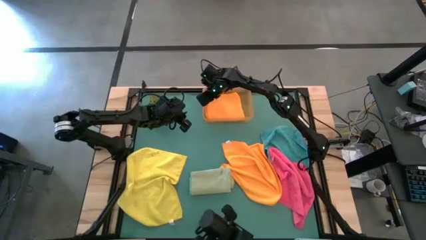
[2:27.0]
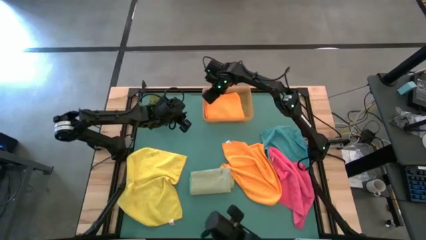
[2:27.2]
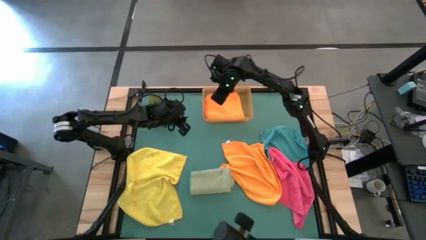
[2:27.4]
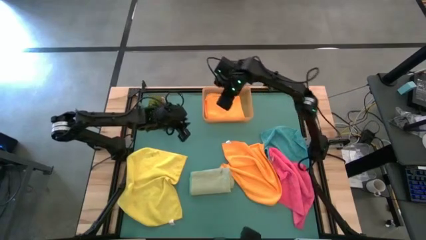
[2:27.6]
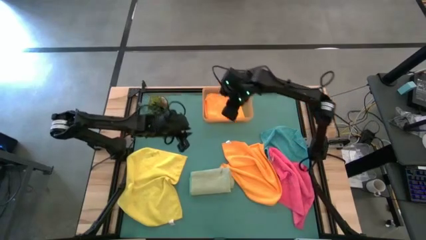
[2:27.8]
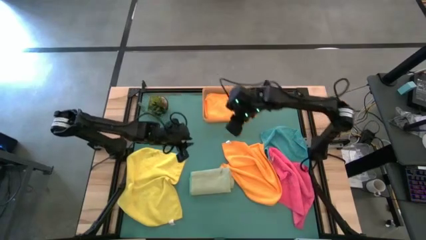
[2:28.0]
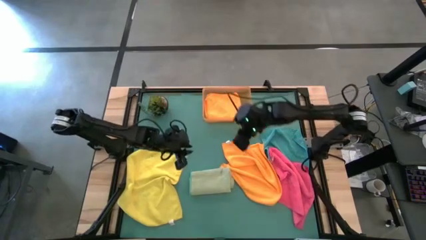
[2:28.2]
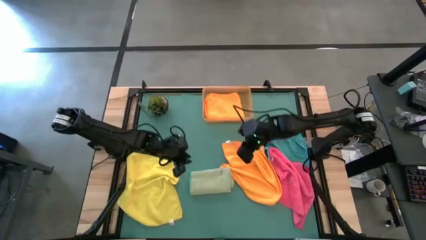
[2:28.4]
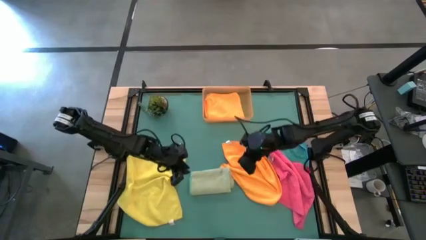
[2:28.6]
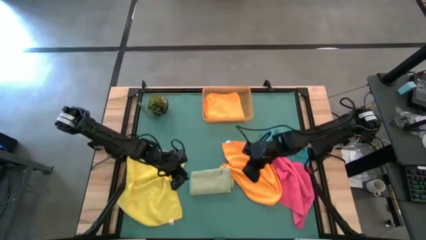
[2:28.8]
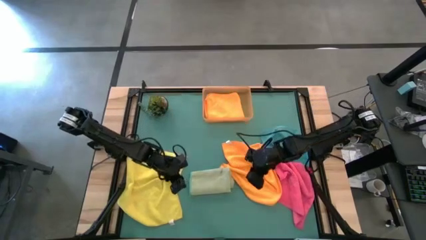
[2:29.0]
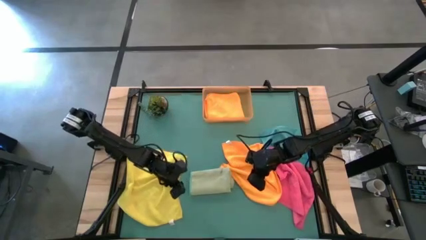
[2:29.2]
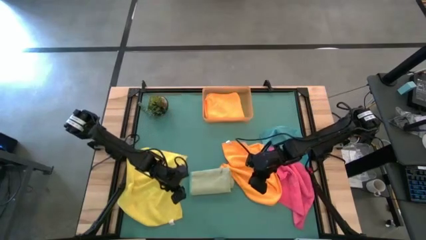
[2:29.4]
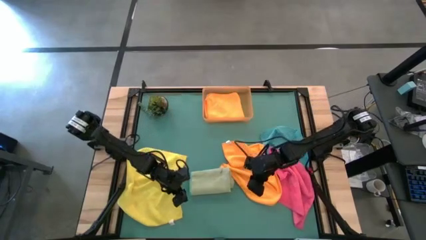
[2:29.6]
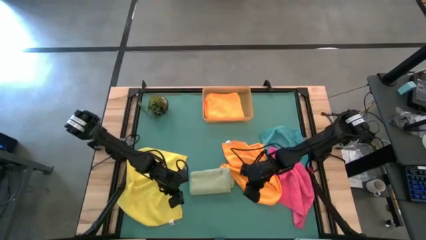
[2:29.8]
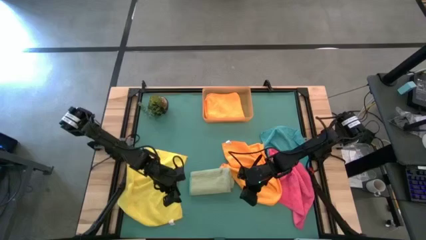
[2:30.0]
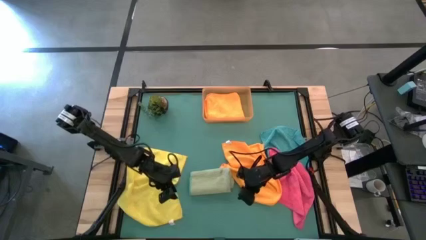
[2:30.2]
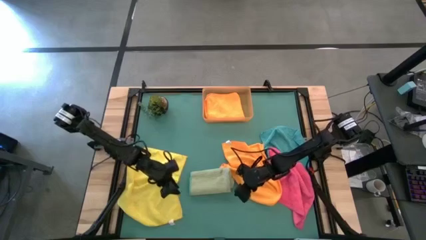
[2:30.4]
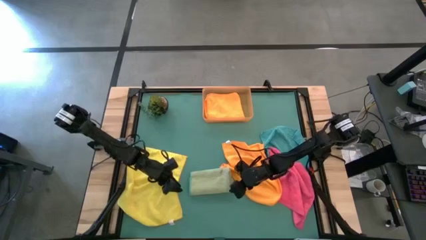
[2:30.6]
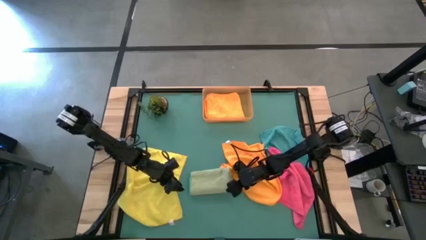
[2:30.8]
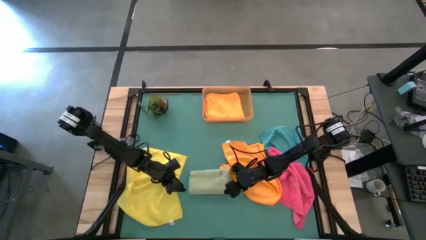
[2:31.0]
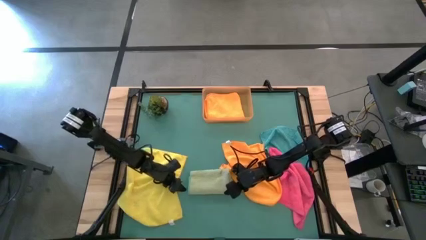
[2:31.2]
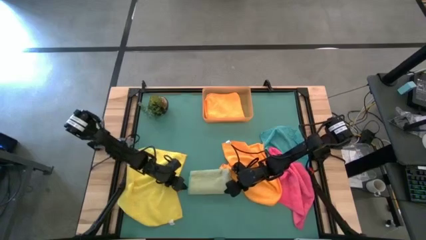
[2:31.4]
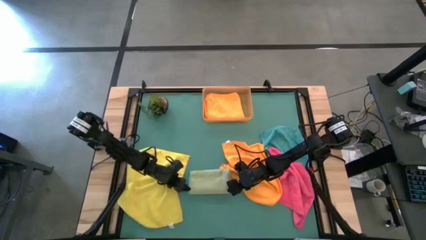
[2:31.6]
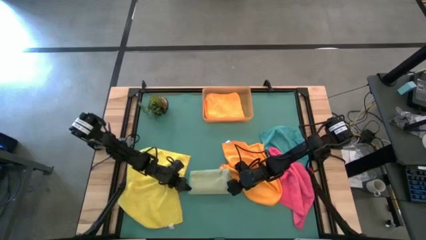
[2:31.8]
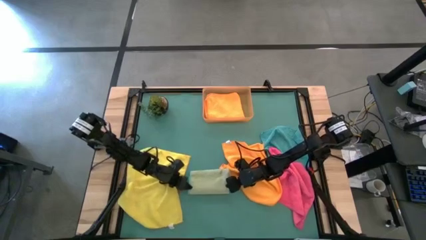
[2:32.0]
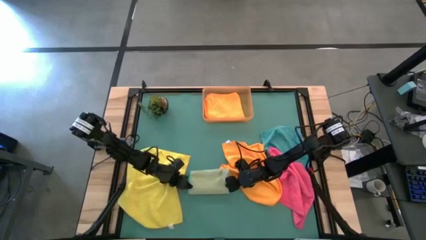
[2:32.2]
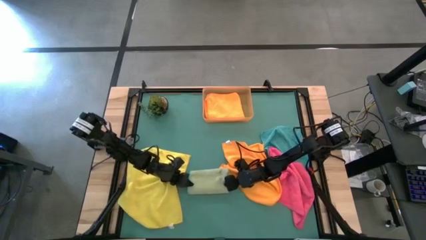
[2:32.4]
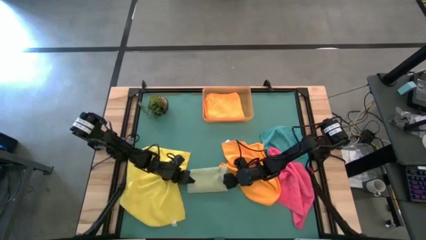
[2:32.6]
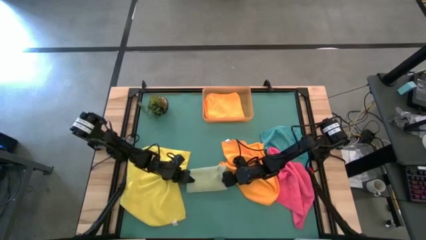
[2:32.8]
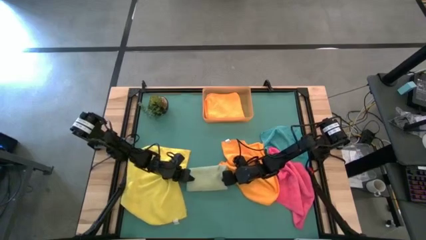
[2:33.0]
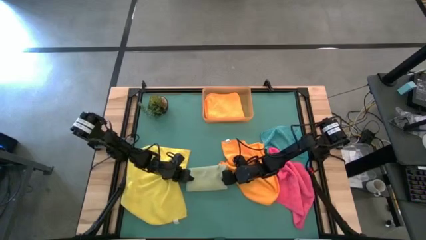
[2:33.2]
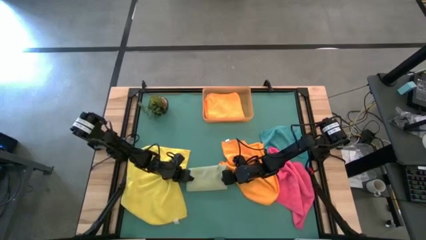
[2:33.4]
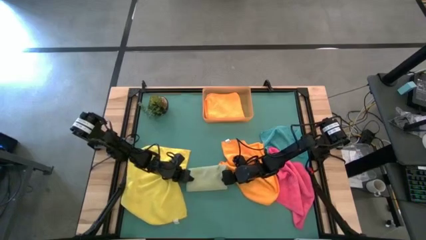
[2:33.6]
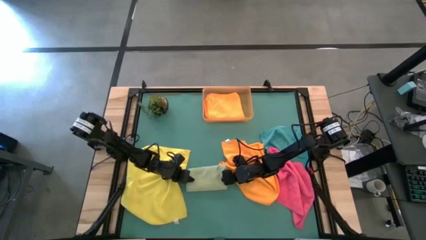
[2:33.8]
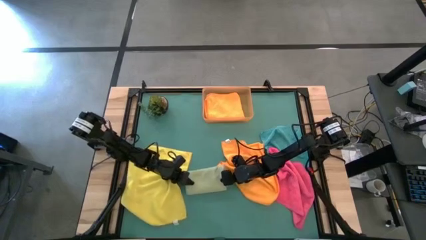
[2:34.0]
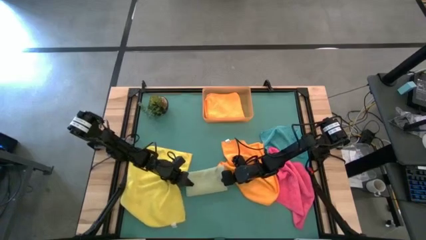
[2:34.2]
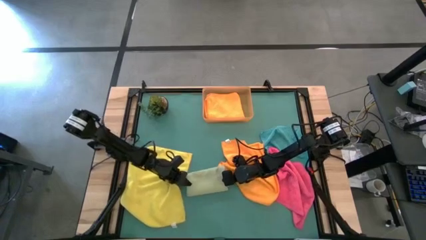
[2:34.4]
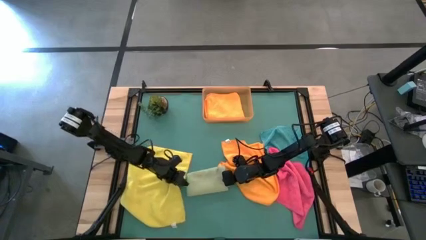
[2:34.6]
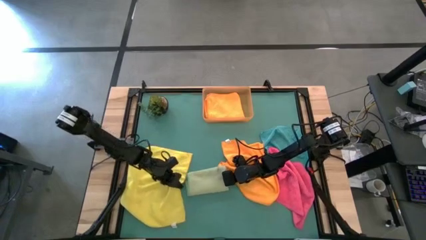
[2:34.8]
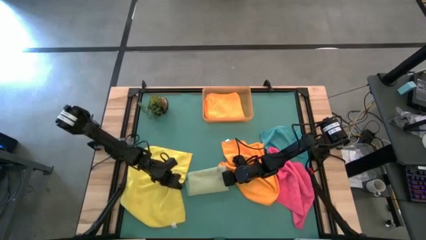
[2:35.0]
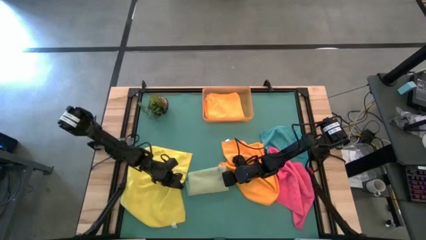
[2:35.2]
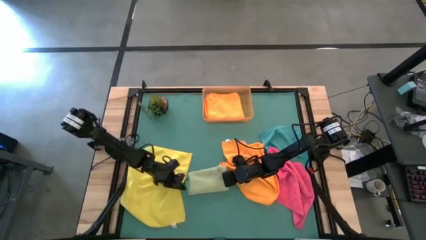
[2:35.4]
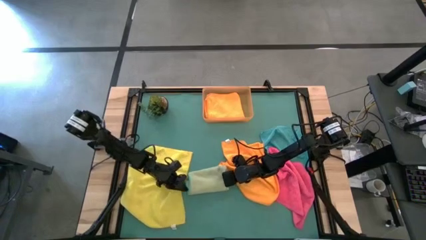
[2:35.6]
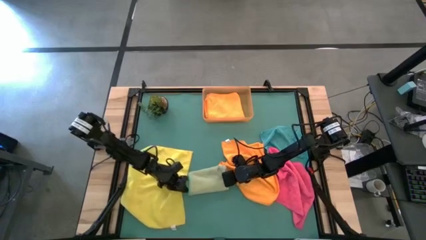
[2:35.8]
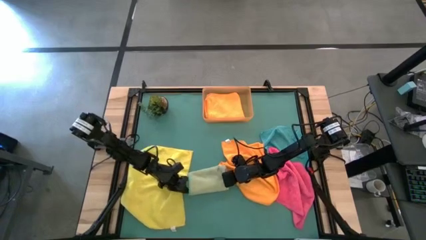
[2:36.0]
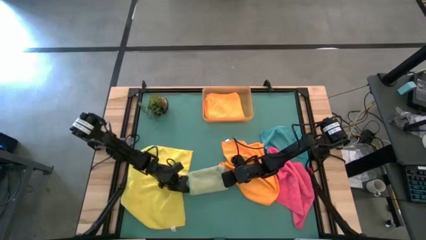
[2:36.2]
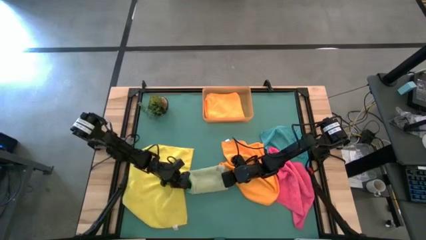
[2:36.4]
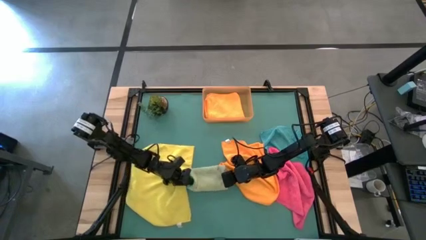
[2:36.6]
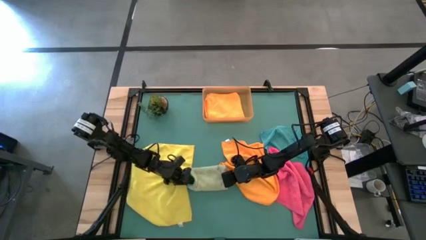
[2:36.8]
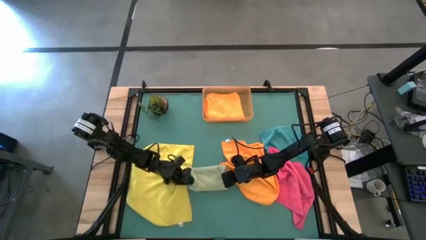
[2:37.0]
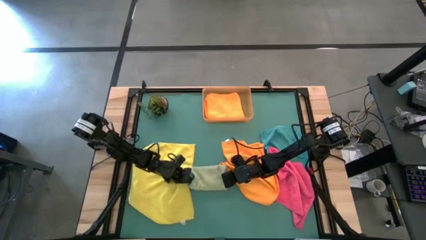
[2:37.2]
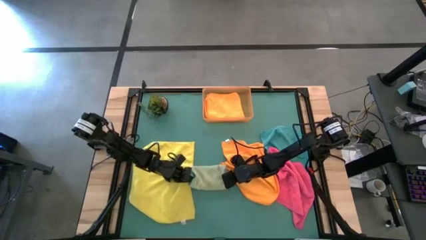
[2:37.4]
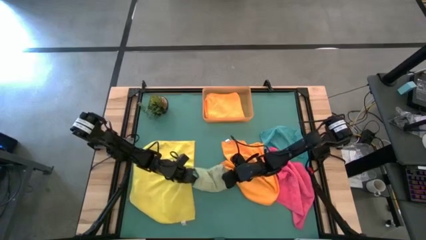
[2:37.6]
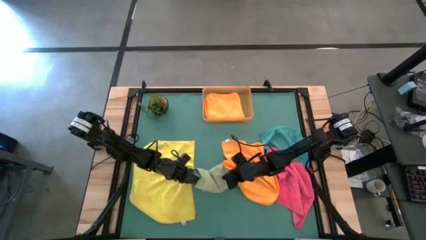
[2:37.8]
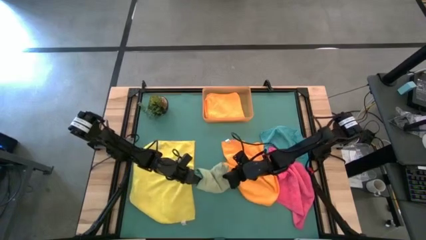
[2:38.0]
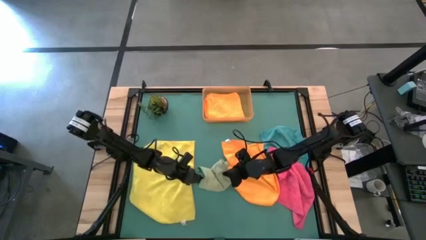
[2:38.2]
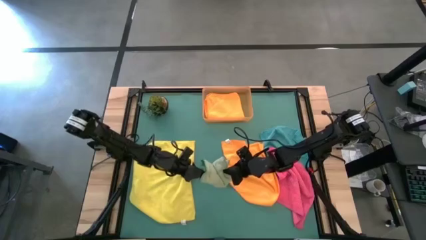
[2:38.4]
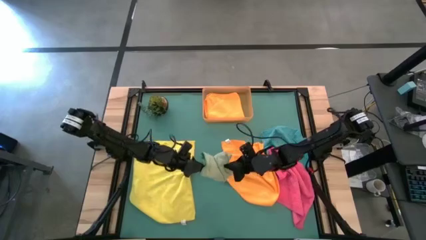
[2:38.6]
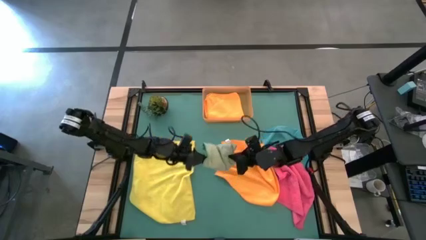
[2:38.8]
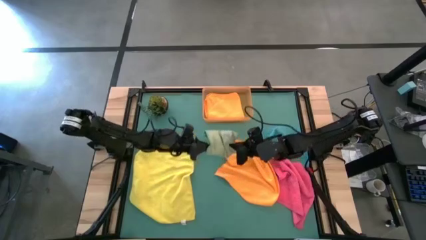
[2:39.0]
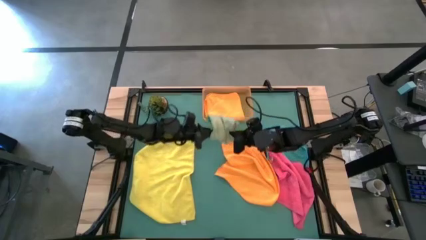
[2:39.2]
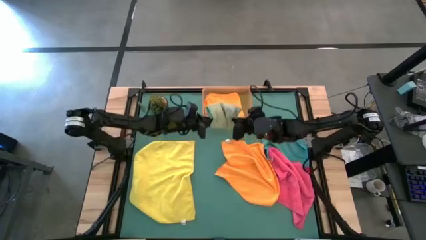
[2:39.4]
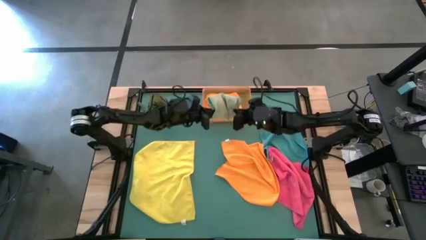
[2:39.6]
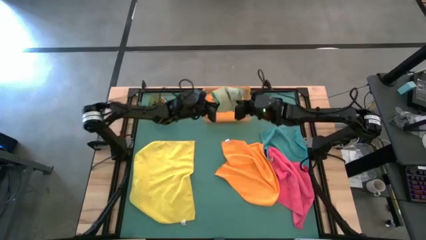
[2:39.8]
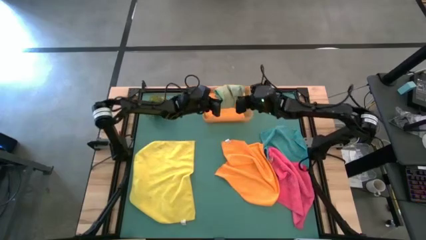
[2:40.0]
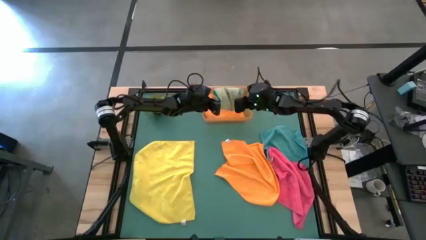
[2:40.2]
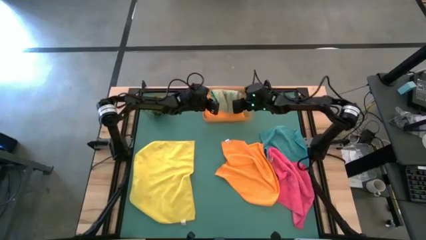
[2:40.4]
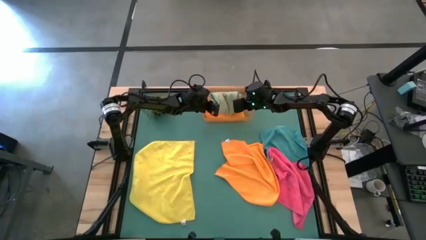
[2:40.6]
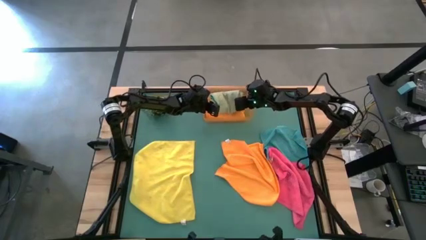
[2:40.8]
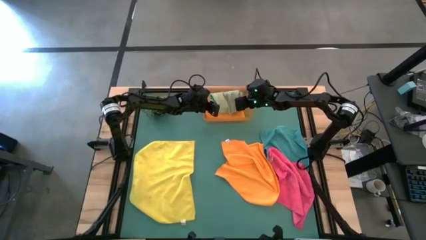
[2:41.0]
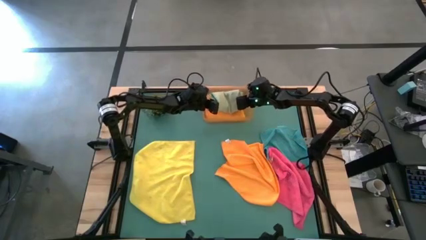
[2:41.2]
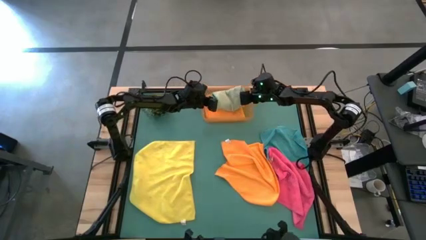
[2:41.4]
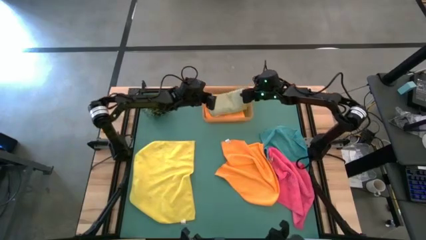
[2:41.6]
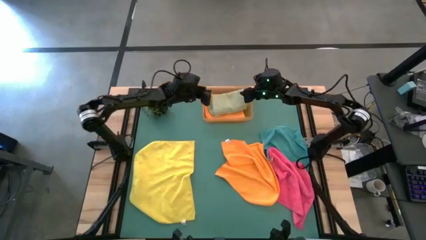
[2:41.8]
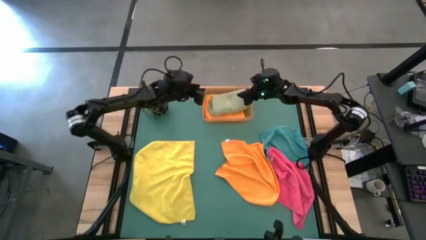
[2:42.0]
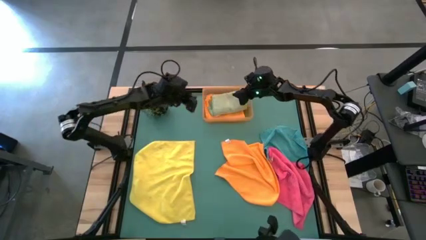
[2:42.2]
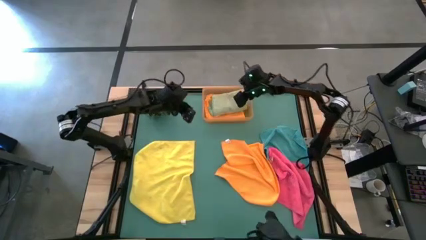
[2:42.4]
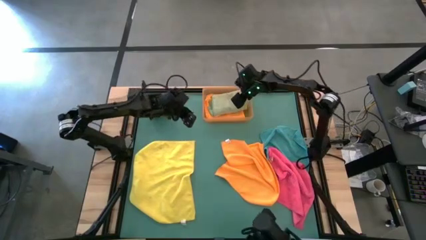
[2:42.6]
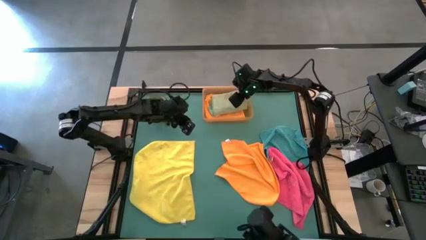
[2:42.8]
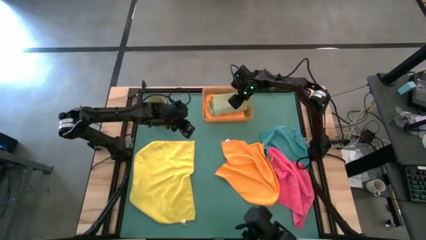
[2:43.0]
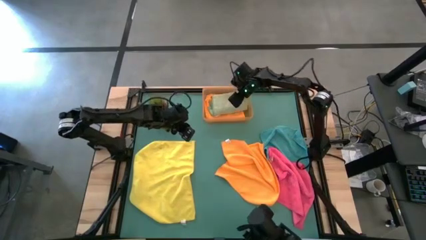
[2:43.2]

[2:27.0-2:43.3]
Task: Fold microfiber towels
Put the folded light green towel into the orange bin
